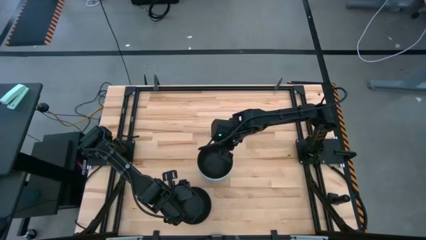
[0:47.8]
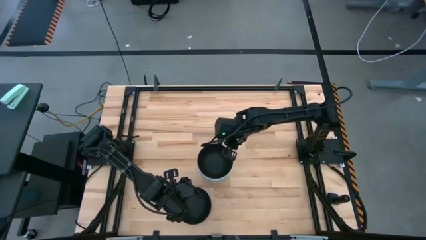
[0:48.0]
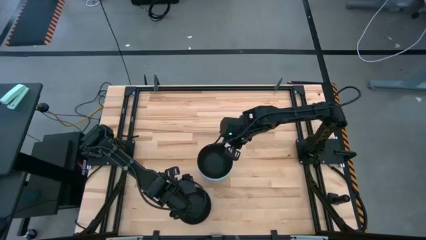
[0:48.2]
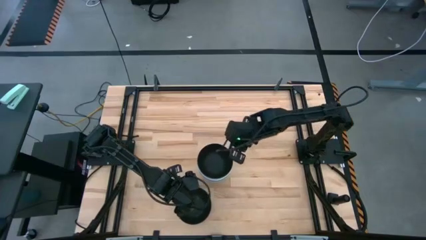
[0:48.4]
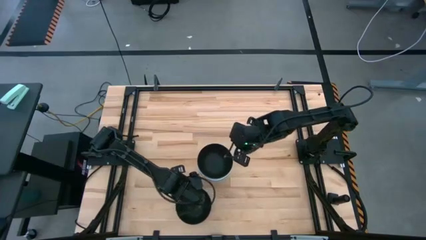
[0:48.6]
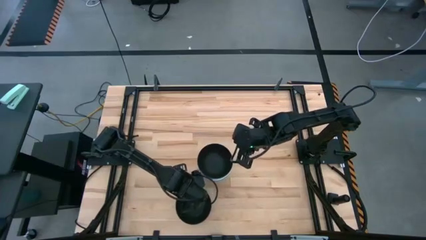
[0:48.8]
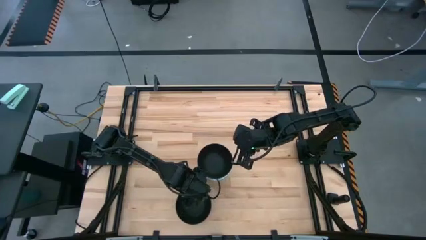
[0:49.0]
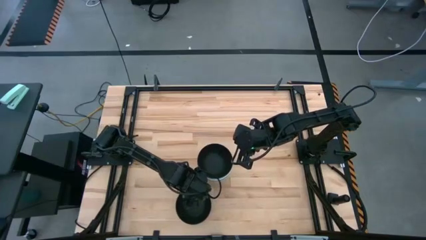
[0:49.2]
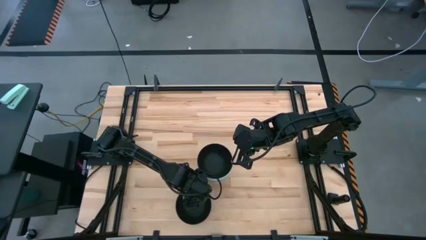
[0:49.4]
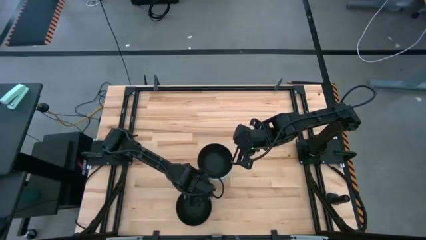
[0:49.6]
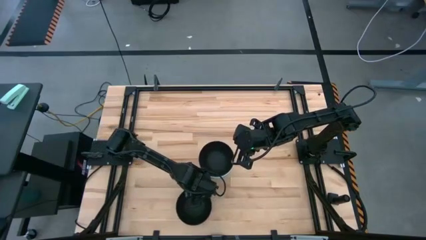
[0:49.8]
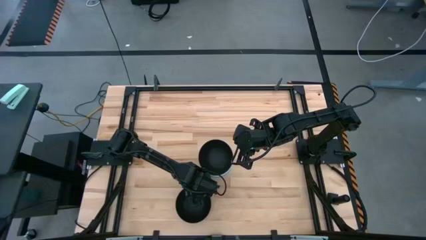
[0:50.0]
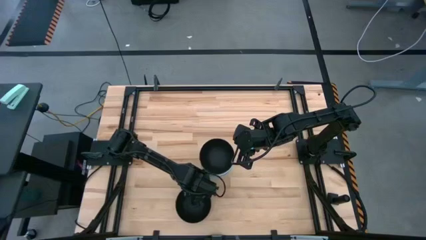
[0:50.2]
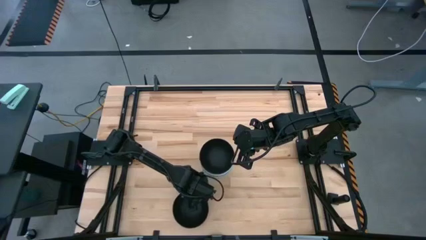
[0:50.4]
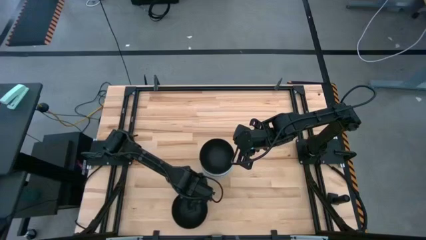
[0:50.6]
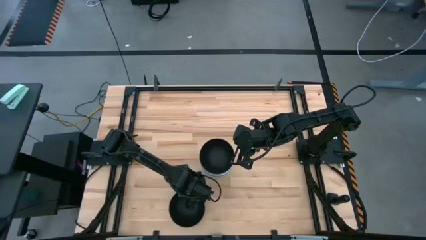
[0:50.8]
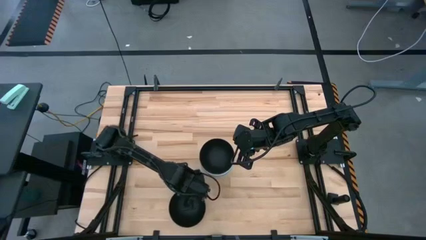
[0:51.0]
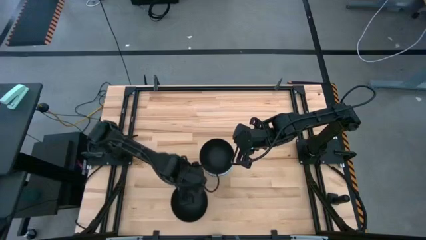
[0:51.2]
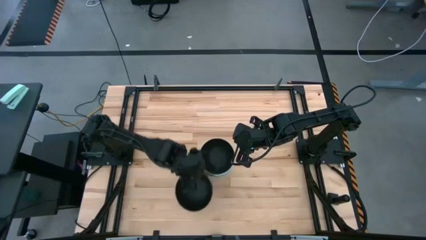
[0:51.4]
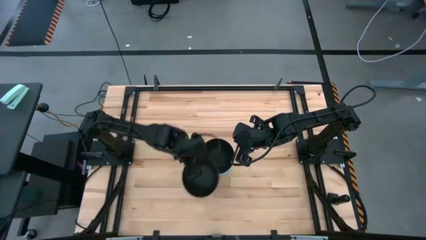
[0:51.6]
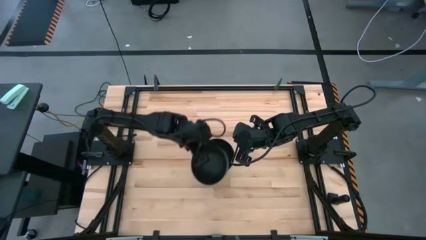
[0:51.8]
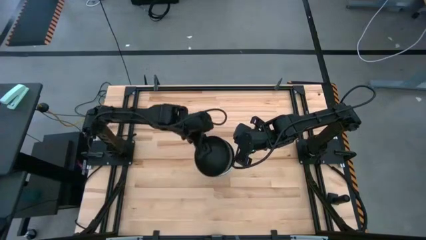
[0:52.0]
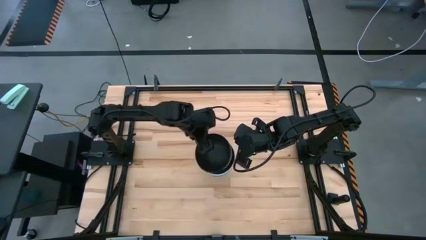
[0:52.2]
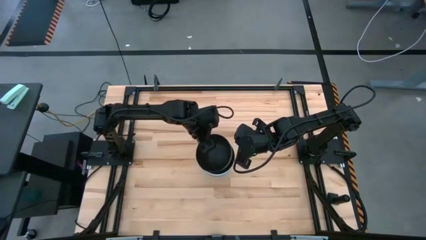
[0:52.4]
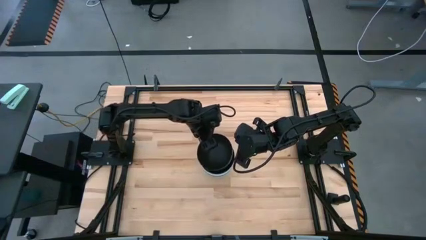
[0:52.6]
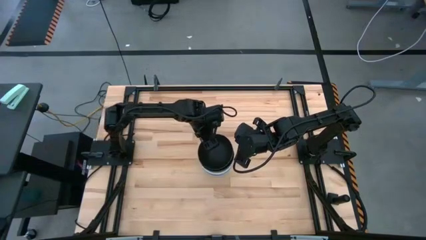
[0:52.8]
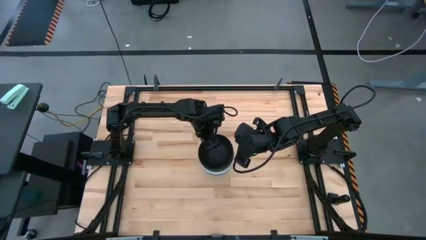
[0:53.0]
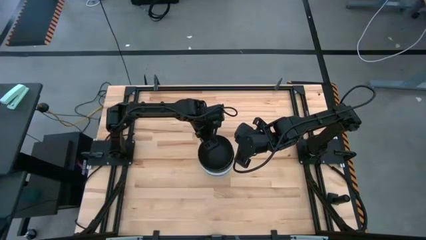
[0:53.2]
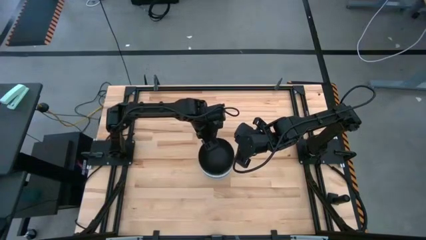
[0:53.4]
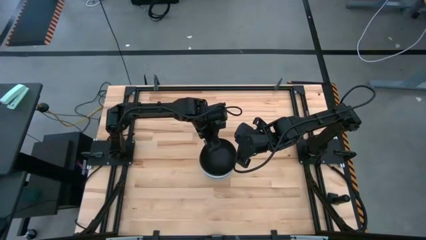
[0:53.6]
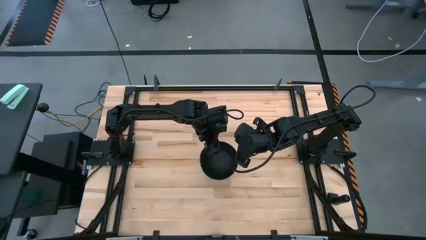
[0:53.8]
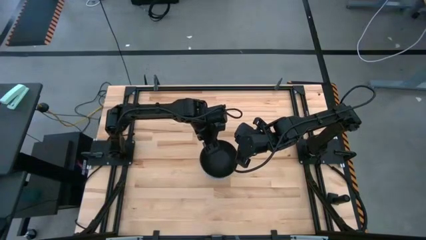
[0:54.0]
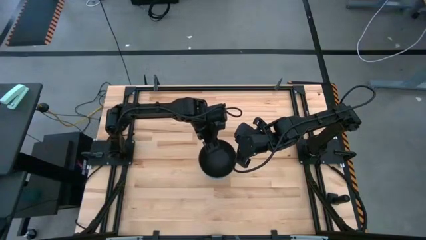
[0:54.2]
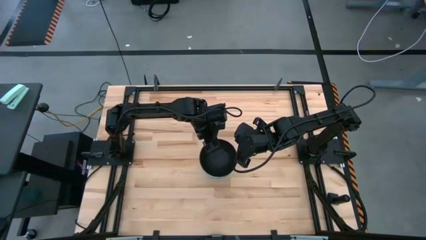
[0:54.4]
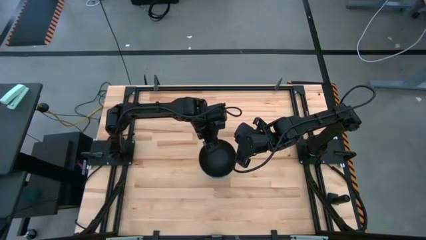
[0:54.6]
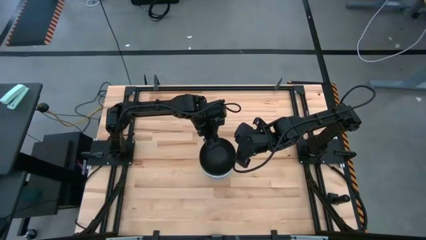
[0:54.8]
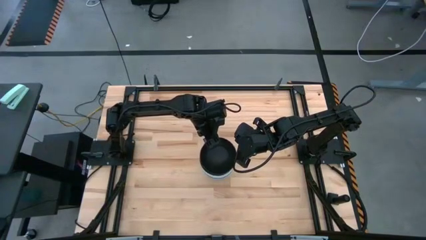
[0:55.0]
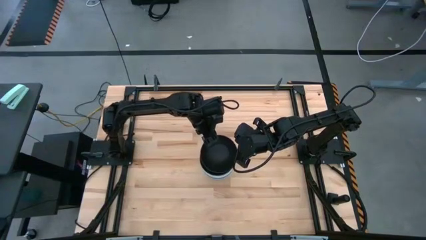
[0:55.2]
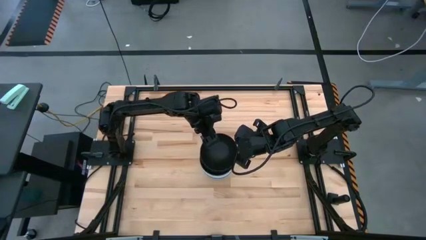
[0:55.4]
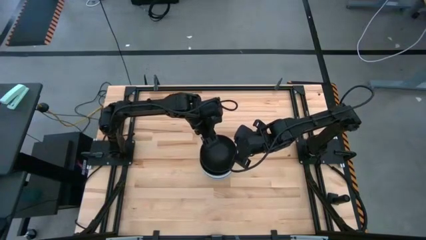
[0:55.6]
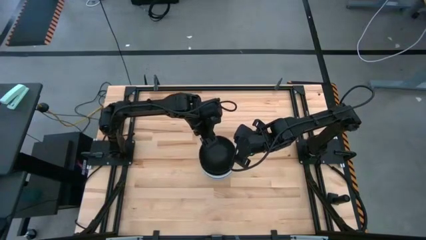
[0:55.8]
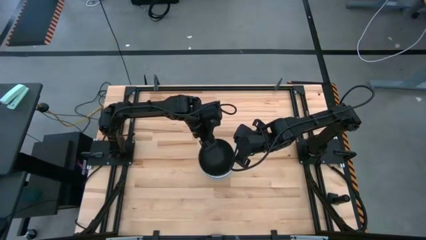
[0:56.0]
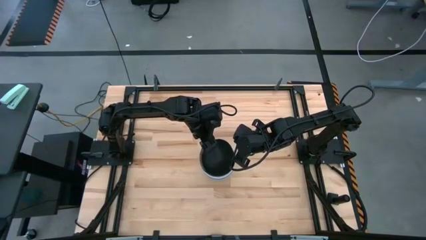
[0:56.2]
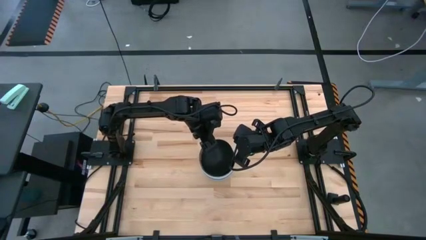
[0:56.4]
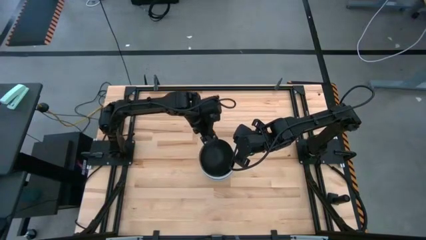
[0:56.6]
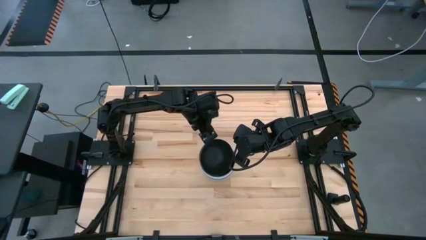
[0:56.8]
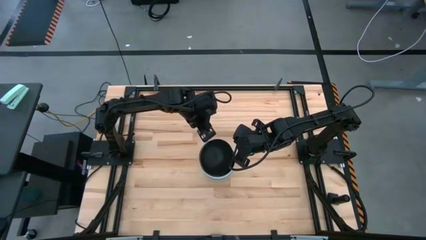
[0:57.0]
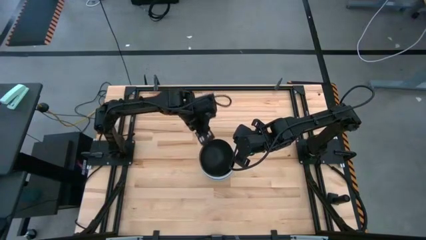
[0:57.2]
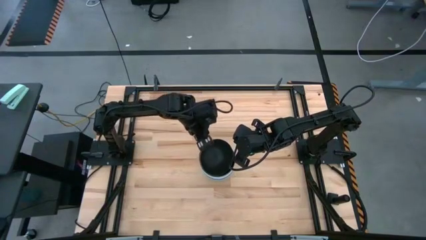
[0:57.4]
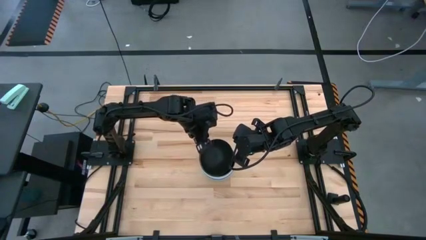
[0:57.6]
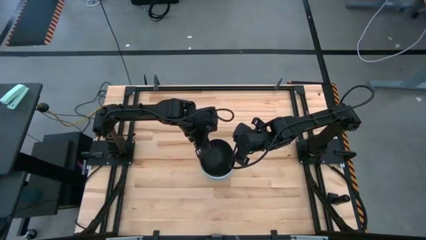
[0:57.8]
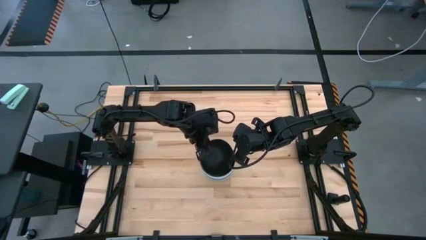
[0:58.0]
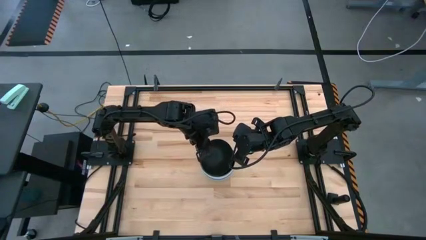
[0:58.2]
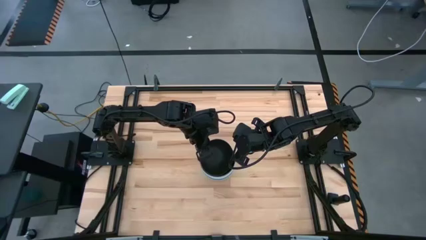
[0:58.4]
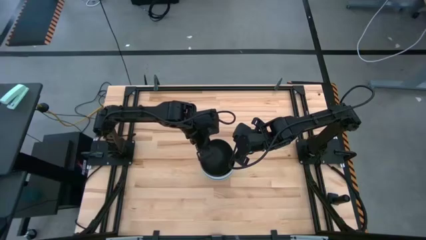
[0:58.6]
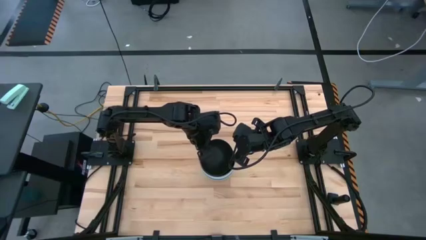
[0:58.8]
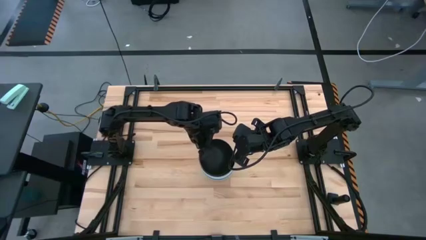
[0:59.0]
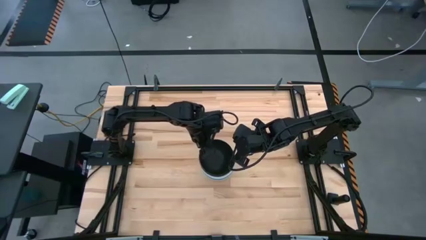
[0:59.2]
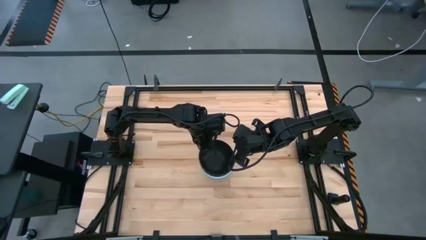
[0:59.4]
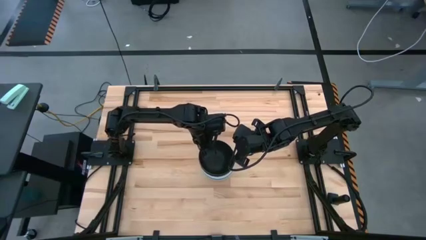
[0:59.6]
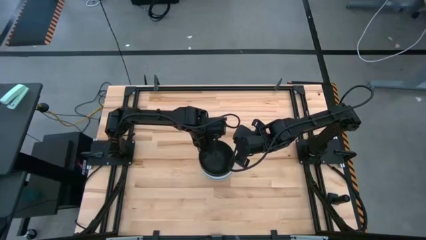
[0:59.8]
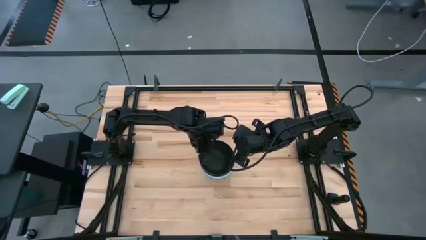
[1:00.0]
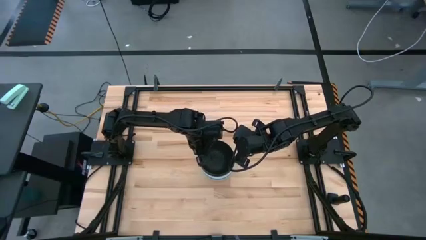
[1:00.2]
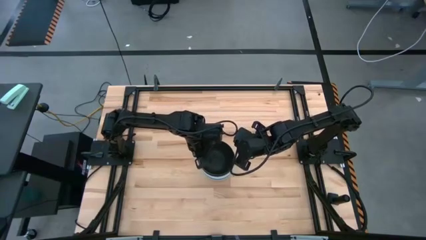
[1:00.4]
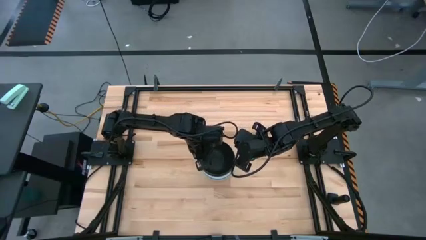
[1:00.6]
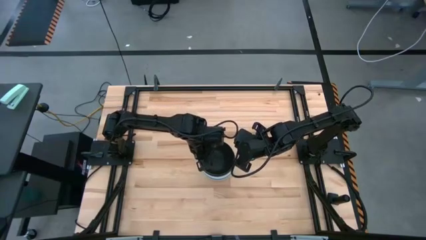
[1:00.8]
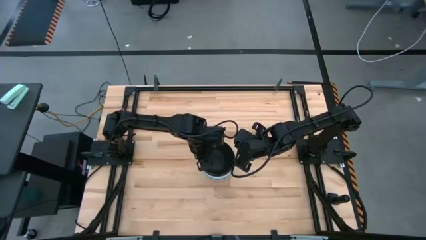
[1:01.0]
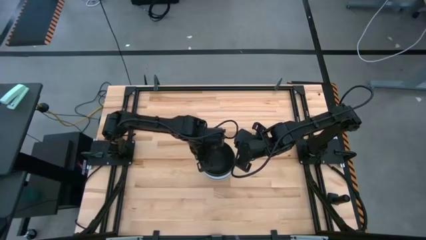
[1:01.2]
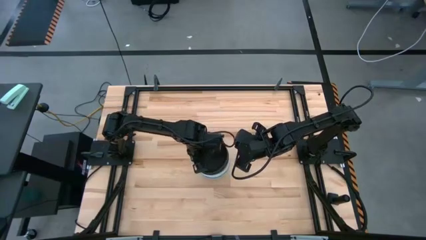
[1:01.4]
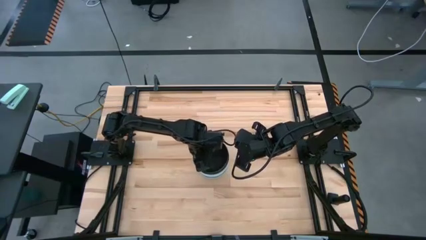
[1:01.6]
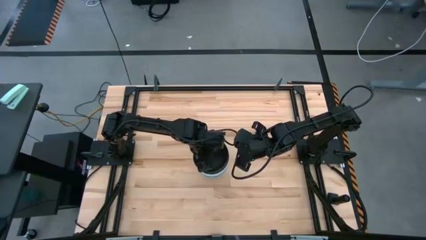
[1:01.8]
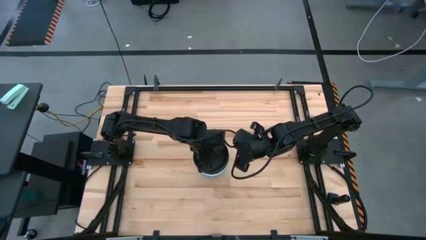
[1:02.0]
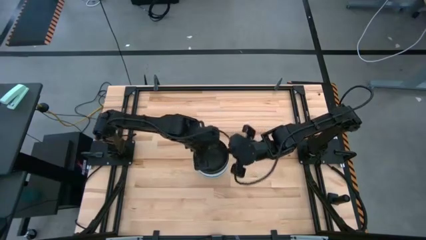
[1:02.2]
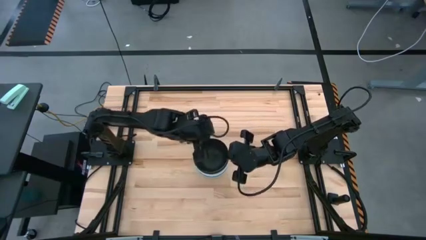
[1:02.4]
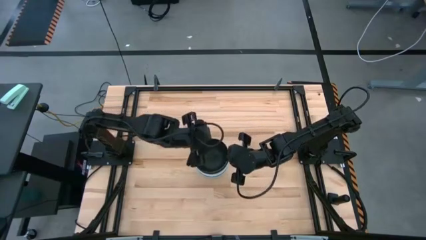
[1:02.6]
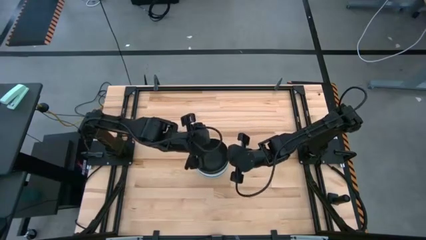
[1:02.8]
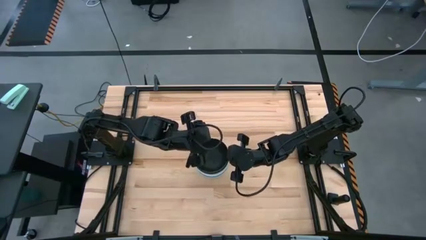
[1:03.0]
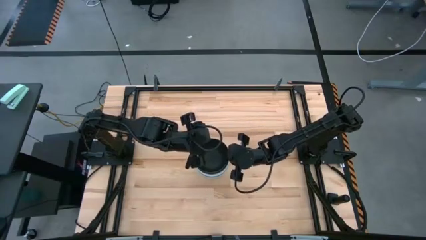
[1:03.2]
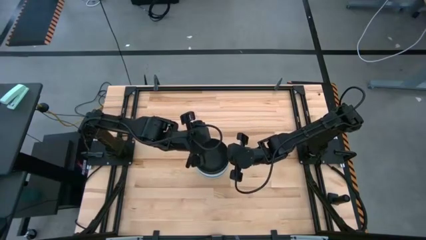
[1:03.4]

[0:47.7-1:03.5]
Task: Nest bowls inside each other
Stack the black bowl on the stacked black bowl
